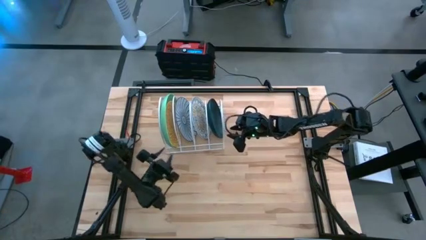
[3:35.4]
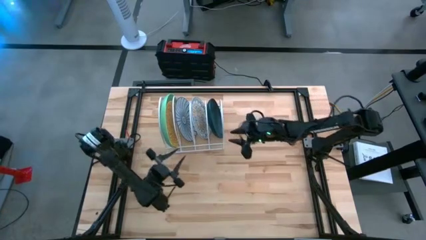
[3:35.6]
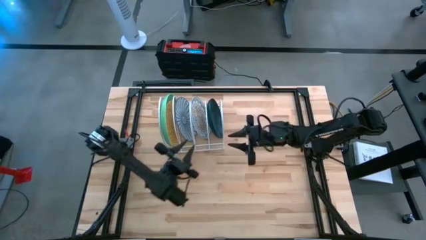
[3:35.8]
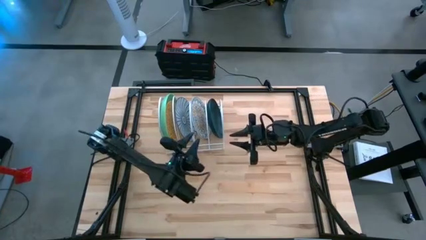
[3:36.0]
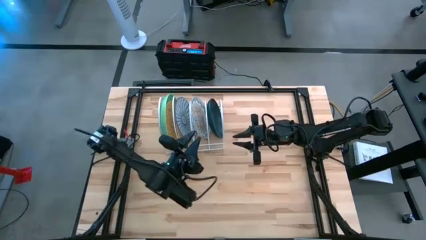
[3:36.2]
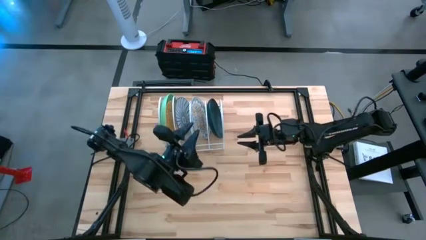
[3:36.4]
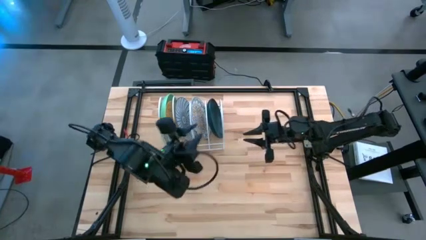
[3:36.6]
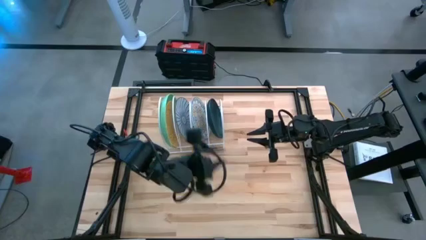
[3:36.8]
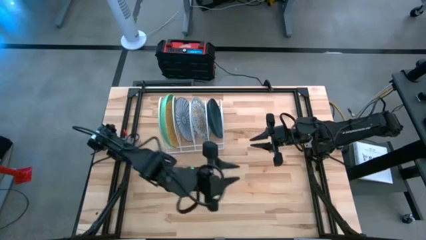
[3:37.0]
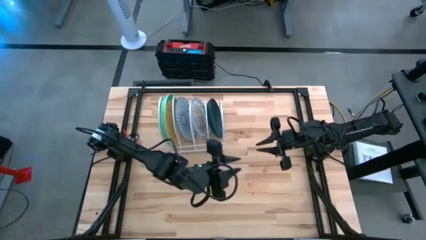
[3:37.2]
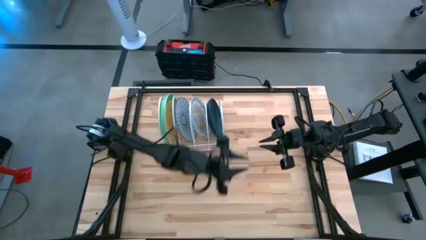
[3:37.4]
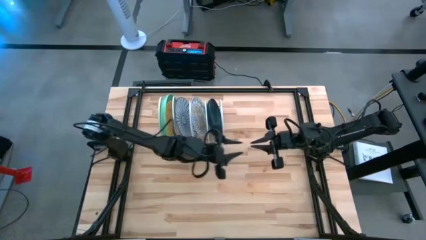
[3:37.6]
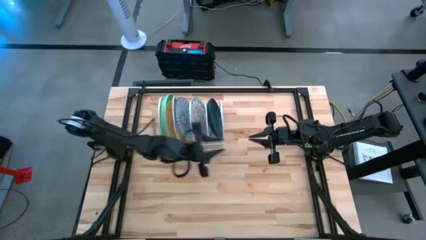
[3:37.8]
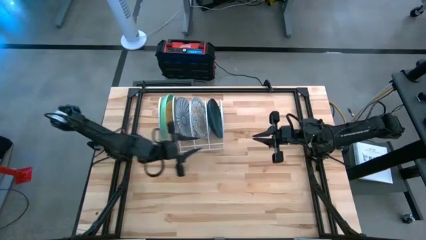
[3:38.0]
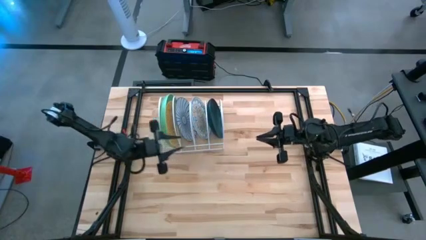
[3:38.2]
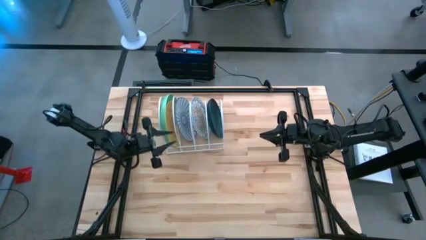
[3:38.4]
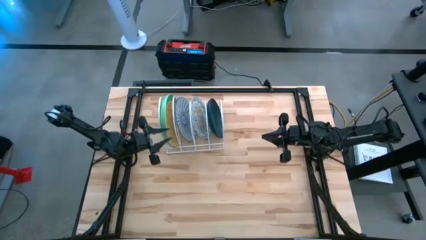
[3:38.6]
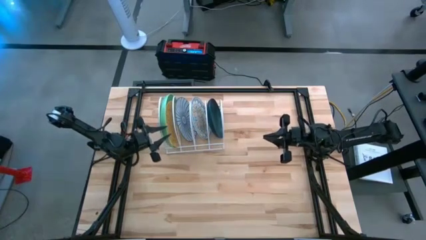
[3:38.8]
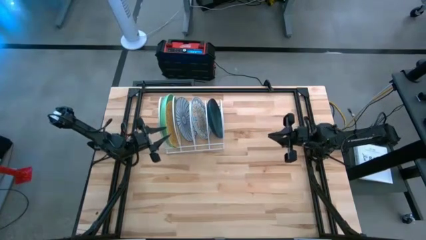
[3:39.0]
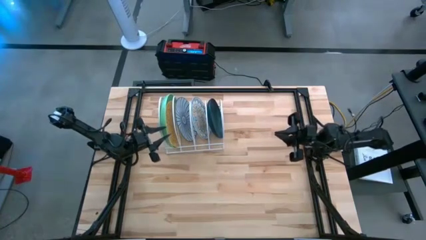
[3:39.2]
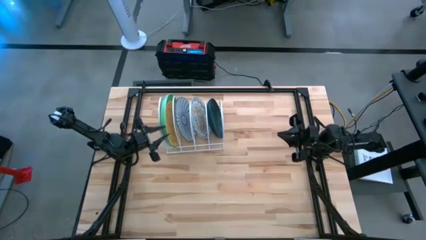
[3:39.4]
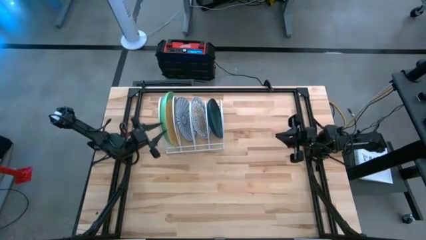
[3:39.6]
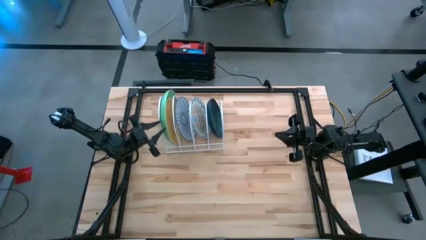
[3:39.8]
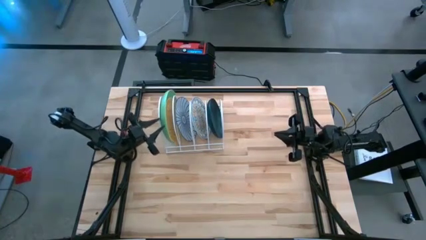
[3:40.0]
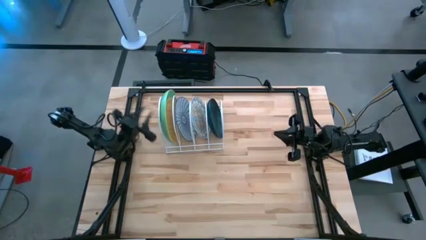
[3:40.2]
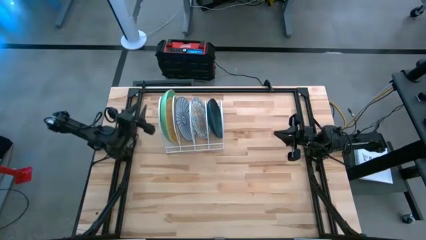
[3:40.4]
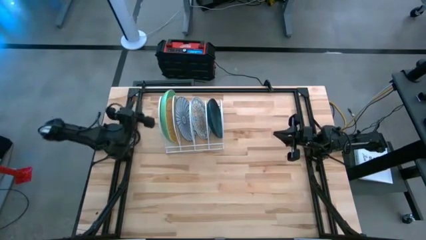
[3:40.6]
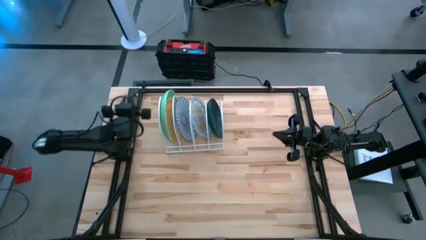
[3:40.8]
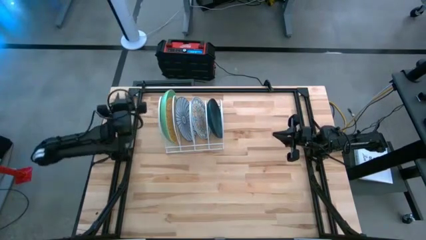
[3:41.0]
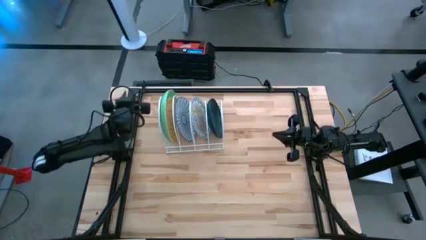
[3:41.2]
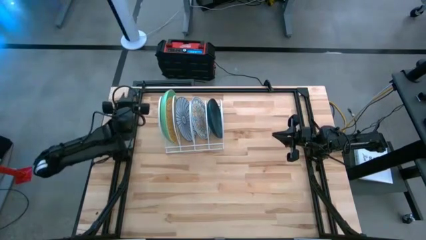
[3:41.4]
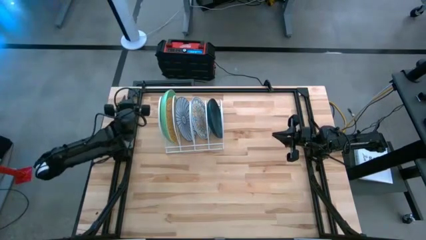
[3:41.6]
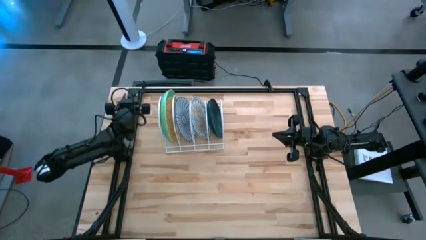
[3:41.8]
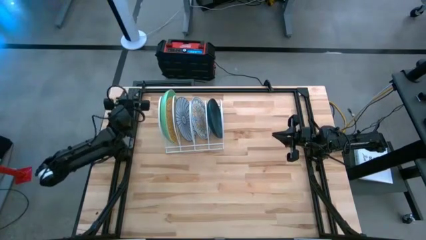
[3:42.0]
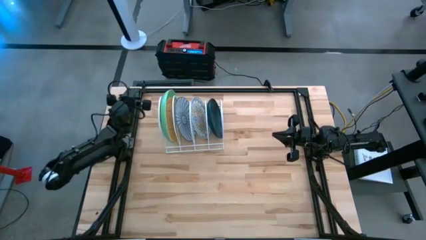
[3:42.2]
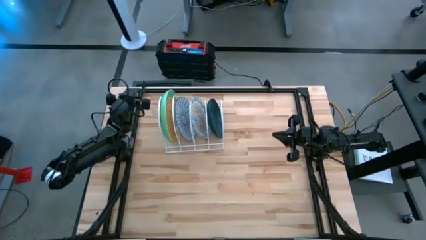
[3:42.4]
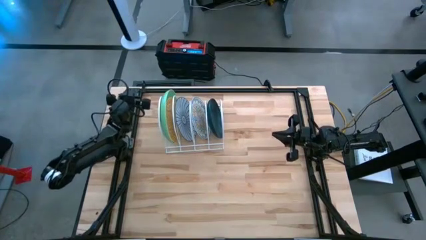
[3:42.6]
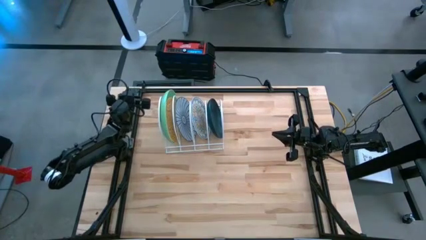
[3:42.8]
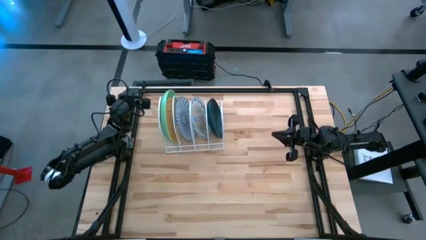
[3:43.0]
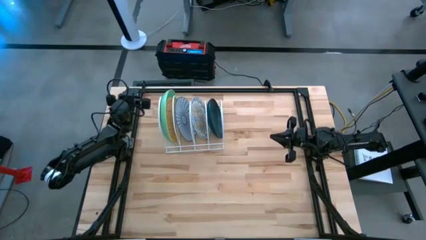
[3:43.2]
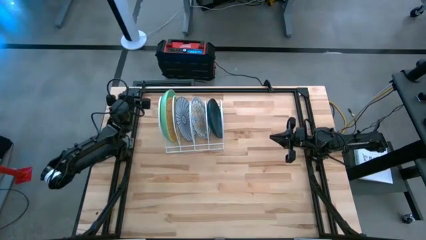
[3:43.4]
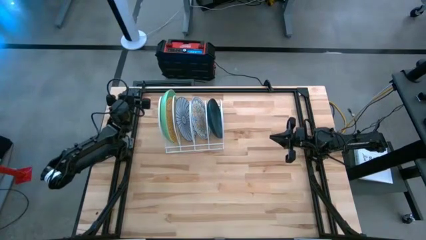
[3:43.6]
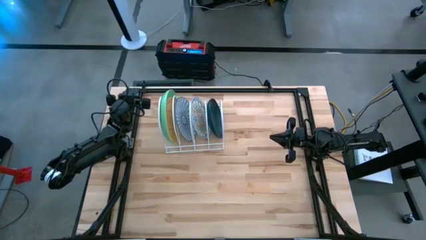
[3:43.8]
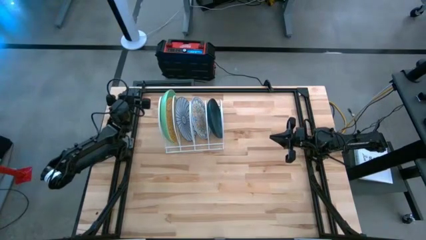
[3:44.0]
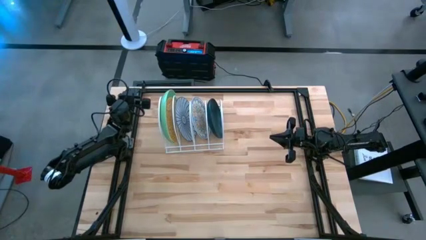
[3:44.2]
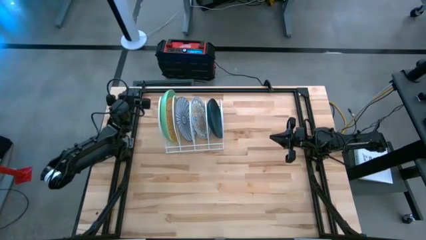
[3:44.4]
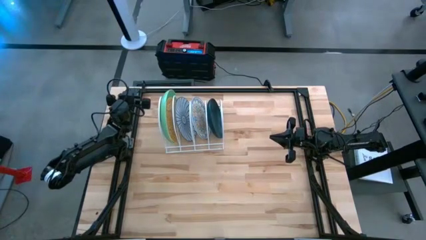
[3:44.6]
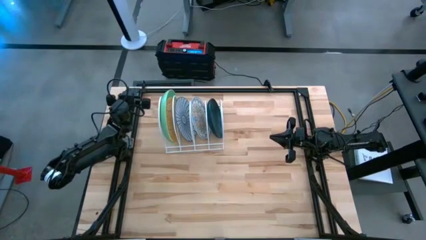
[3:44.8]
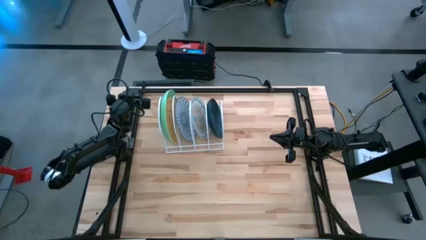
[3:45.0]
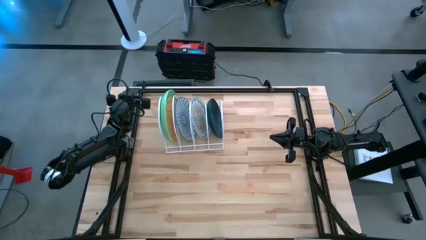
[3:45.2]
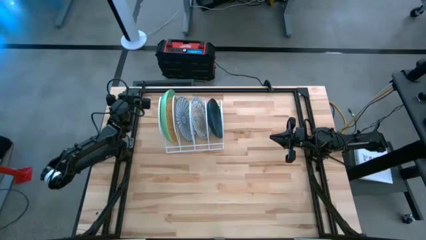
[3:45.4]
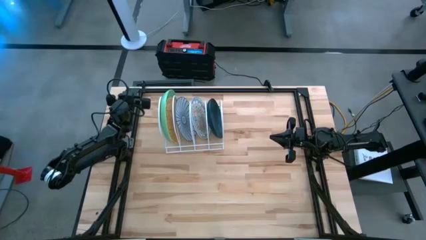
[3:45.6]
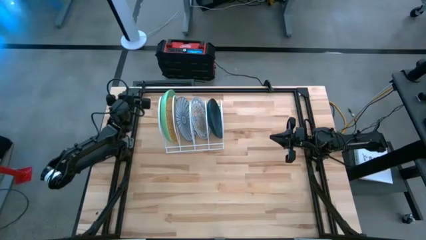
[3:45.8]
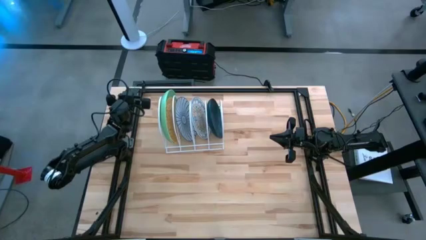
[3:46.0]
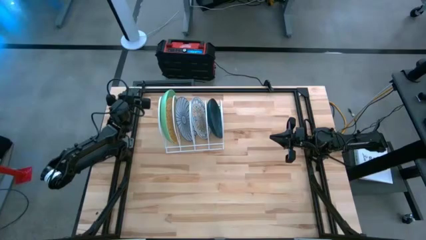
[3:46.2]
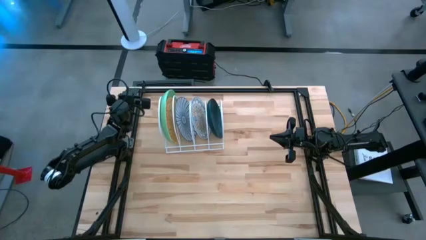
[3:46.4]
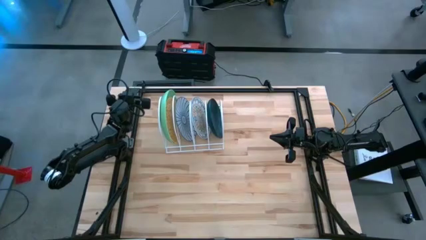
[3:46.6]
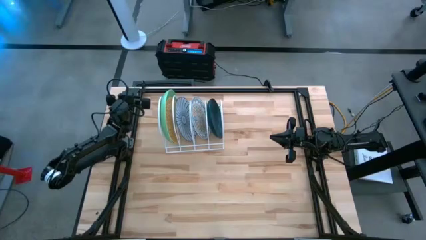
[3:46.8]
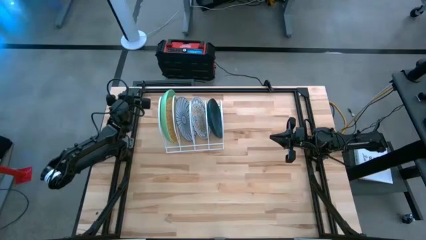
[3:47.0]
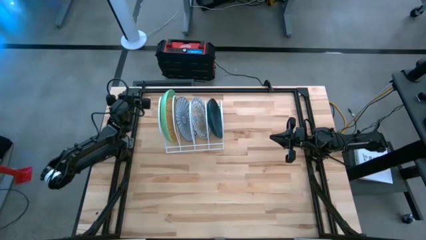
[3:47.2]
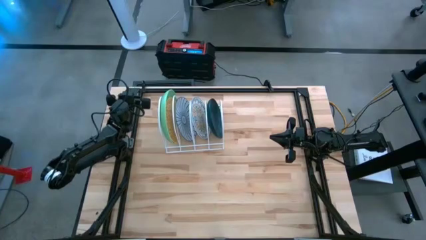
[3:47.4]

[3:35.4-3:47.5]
Task: Sort dishes
Return to Home Position
